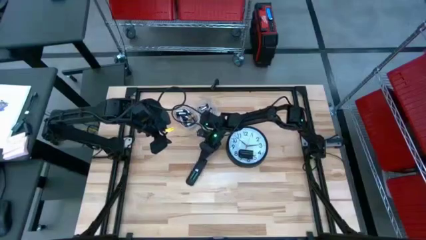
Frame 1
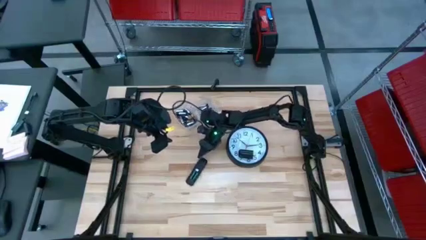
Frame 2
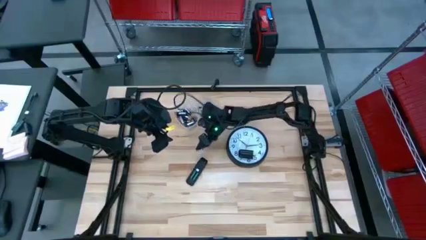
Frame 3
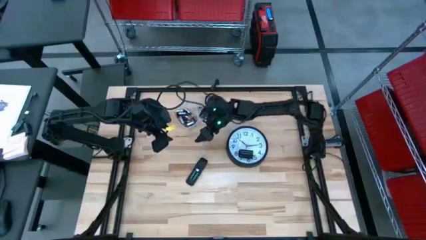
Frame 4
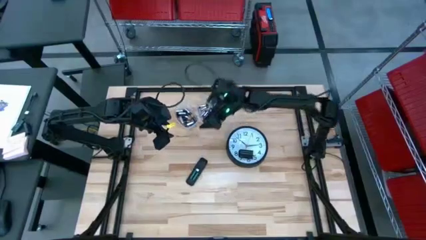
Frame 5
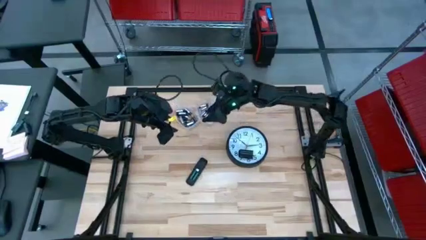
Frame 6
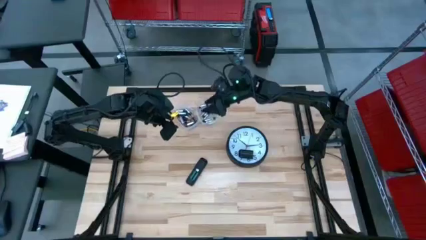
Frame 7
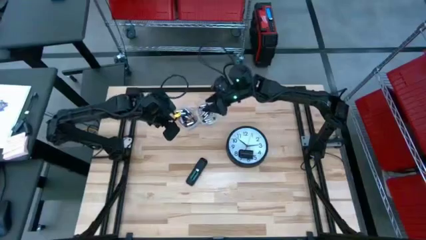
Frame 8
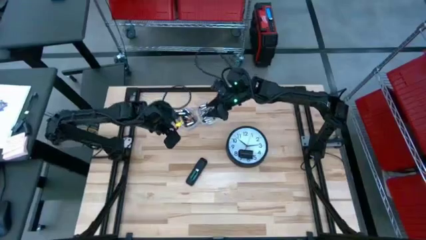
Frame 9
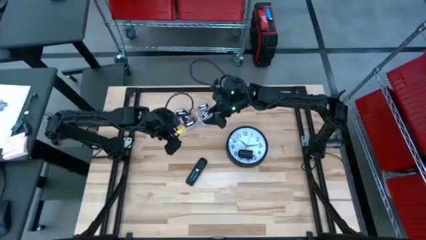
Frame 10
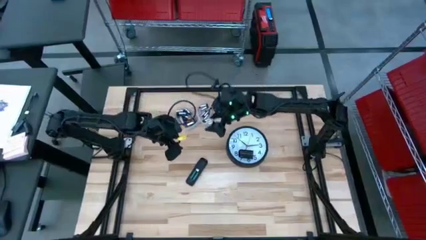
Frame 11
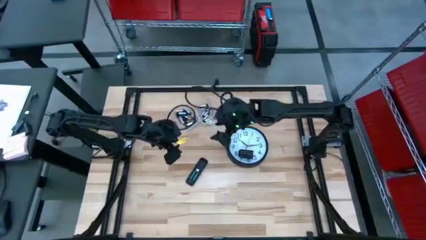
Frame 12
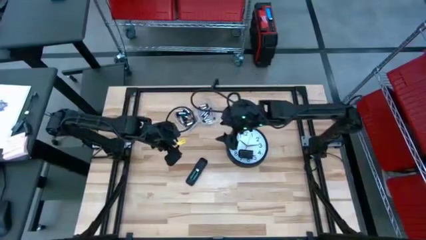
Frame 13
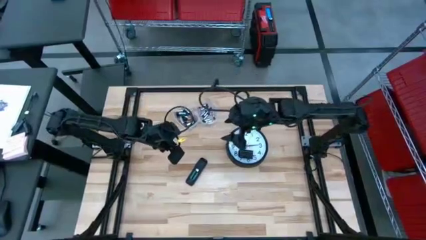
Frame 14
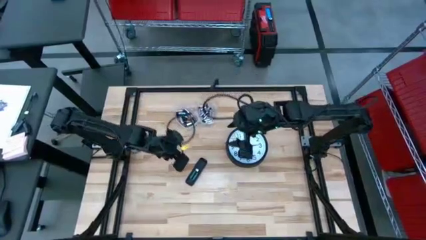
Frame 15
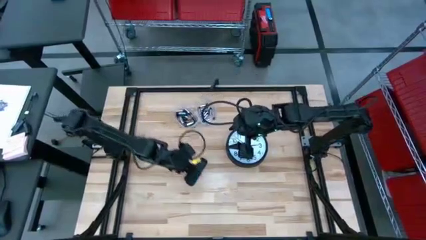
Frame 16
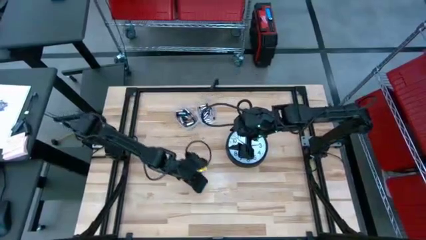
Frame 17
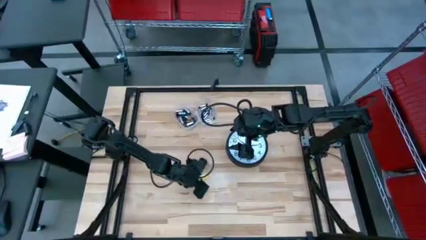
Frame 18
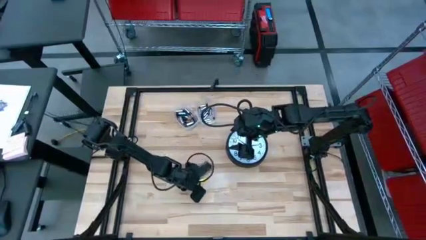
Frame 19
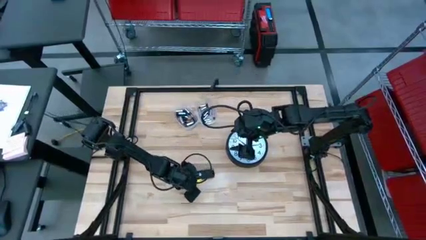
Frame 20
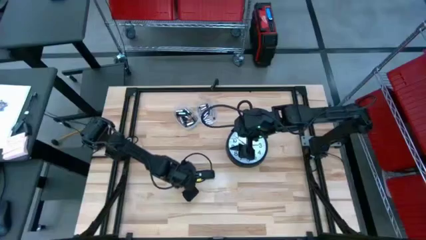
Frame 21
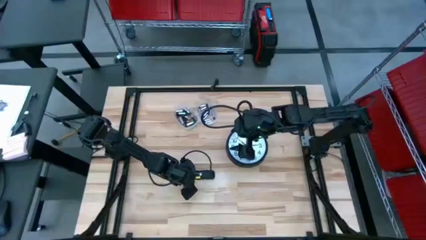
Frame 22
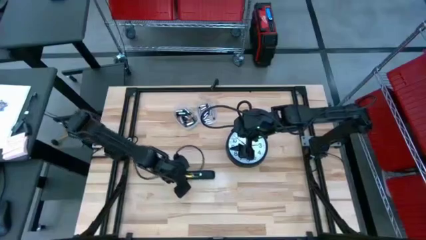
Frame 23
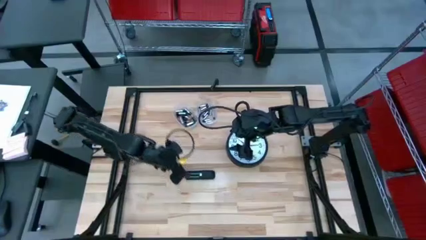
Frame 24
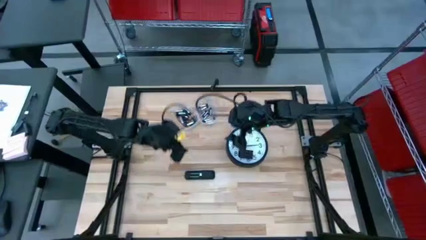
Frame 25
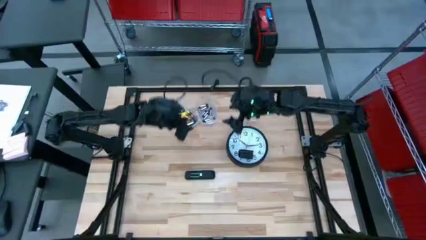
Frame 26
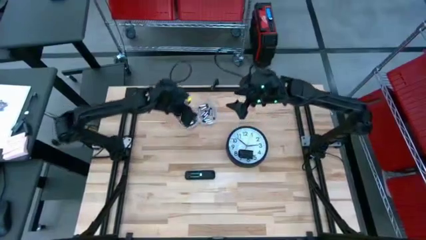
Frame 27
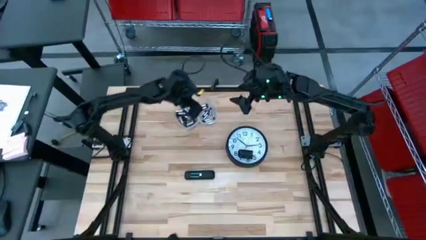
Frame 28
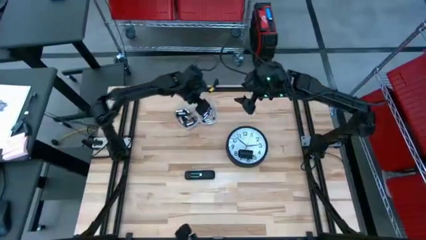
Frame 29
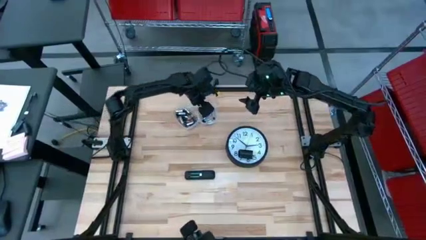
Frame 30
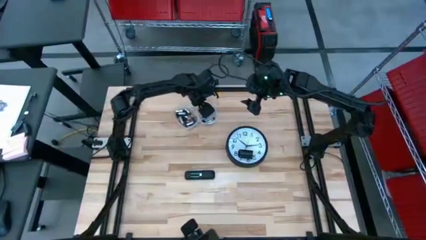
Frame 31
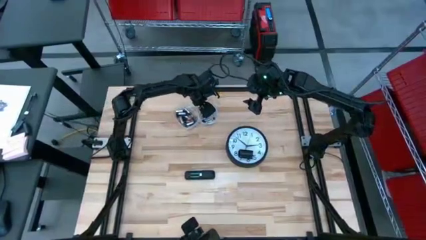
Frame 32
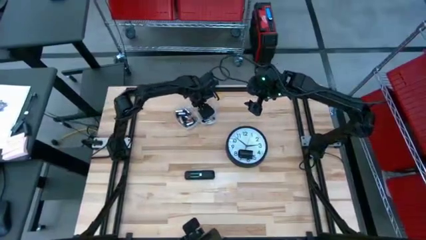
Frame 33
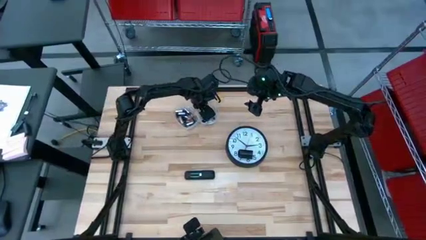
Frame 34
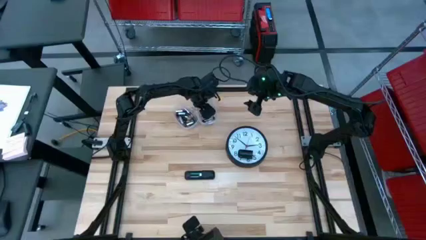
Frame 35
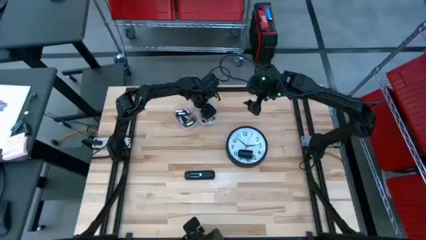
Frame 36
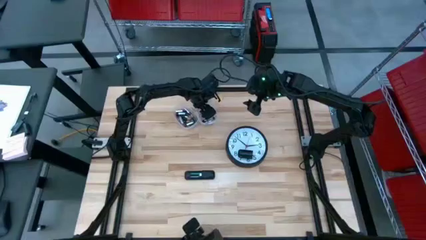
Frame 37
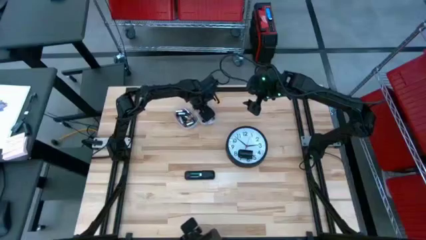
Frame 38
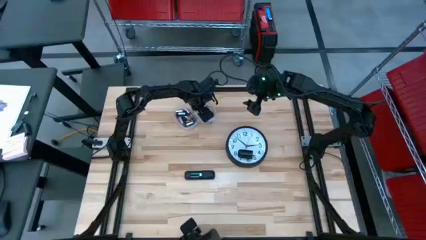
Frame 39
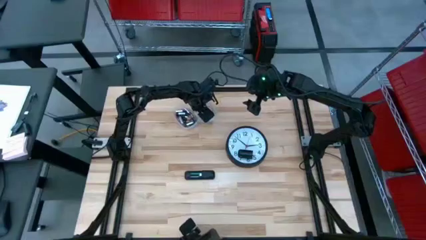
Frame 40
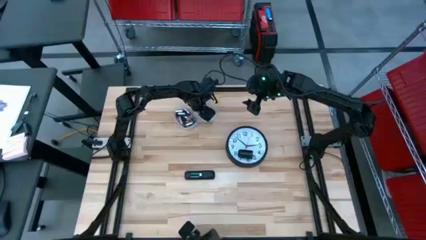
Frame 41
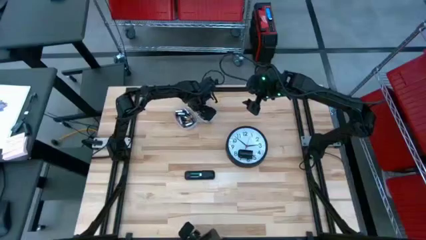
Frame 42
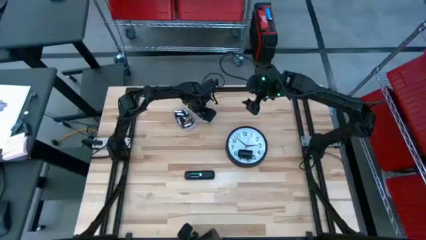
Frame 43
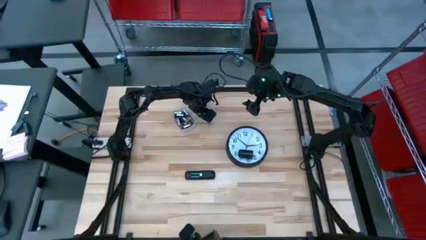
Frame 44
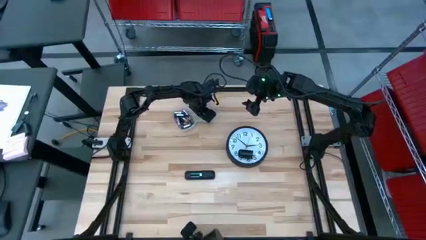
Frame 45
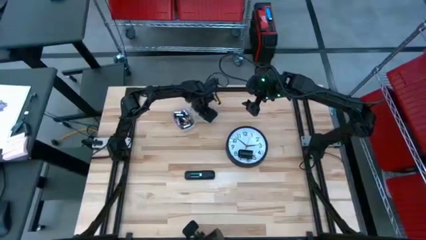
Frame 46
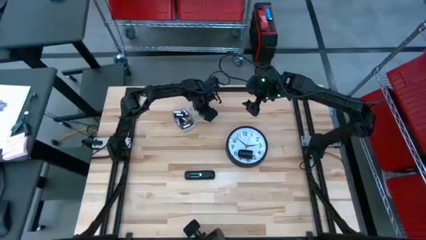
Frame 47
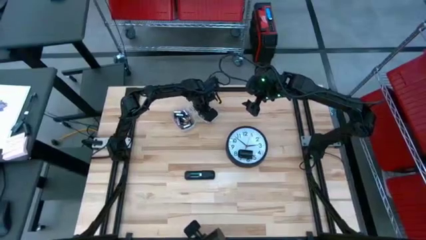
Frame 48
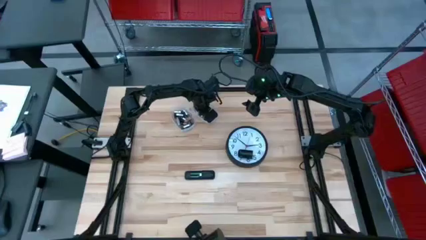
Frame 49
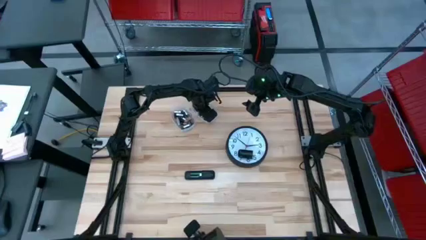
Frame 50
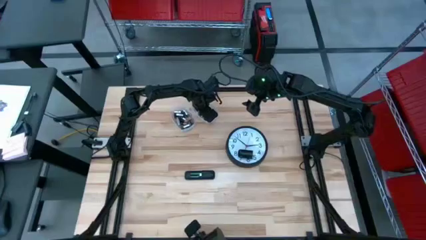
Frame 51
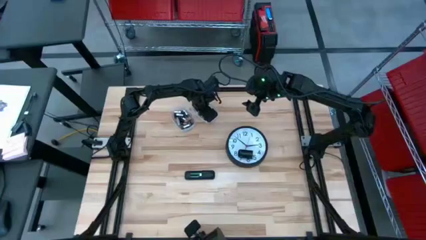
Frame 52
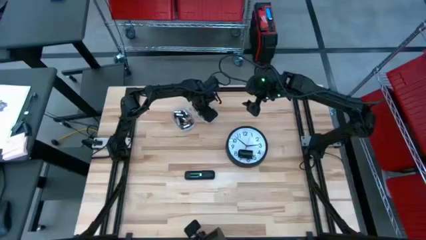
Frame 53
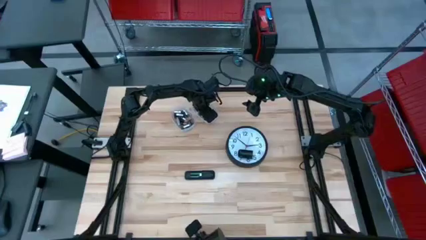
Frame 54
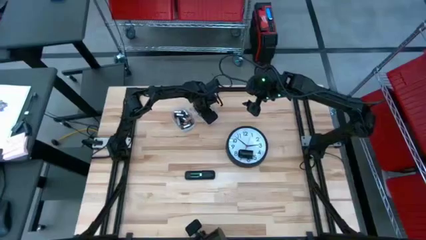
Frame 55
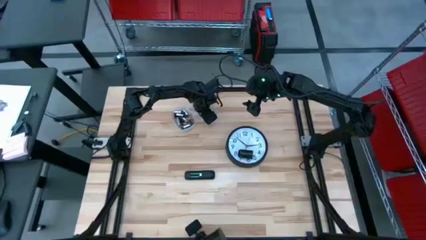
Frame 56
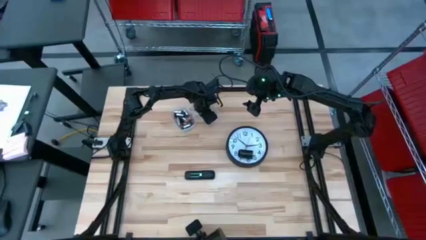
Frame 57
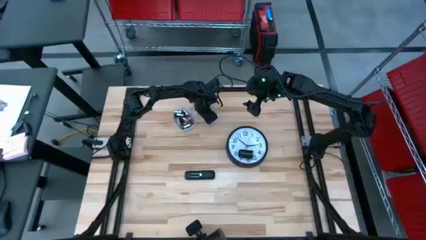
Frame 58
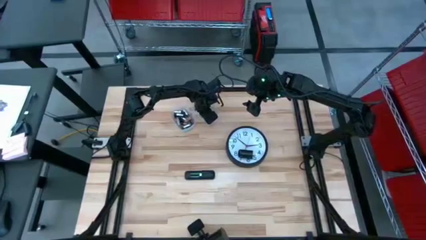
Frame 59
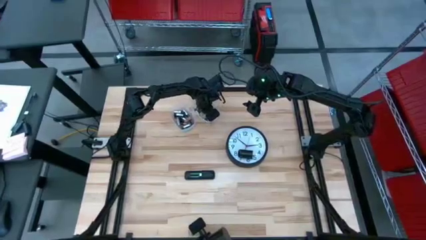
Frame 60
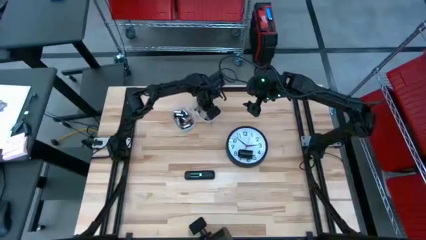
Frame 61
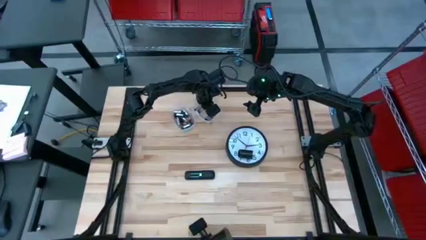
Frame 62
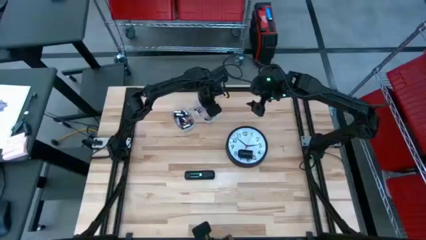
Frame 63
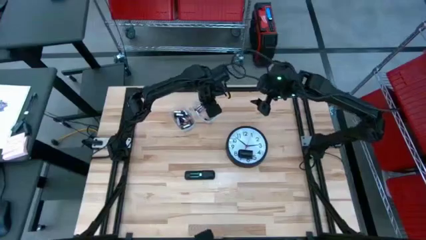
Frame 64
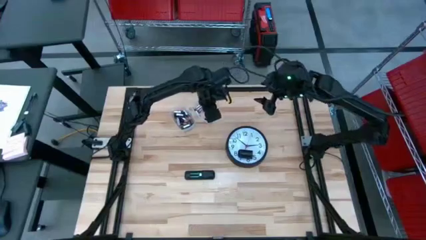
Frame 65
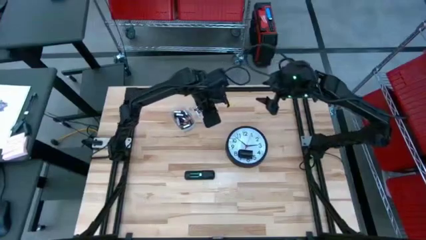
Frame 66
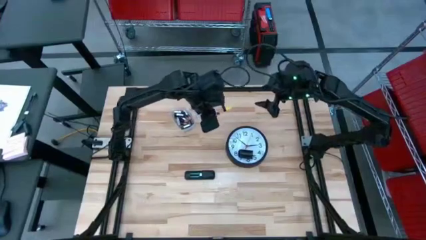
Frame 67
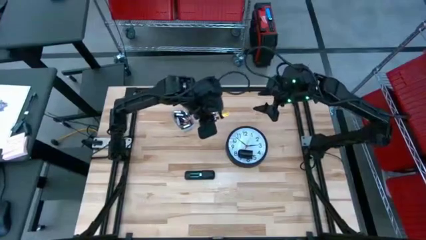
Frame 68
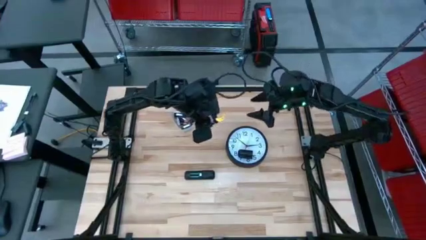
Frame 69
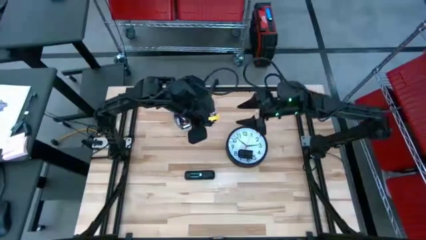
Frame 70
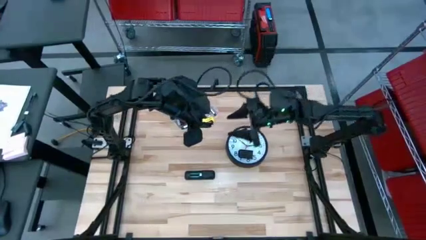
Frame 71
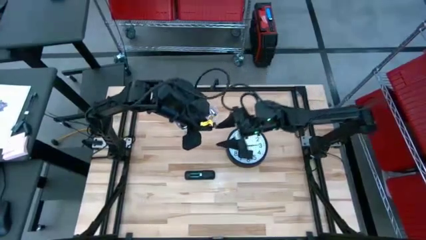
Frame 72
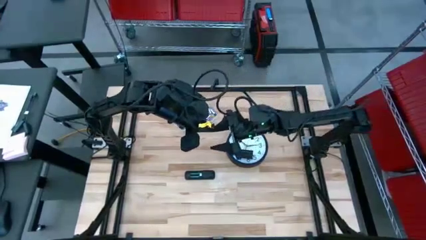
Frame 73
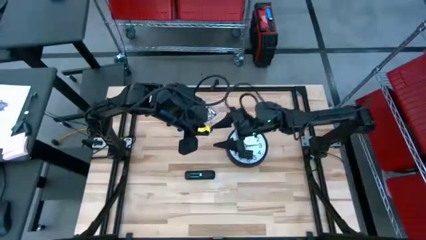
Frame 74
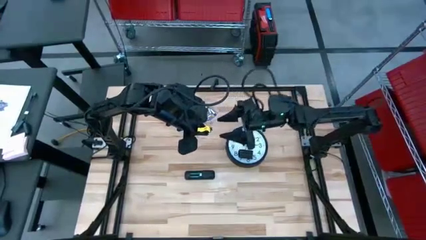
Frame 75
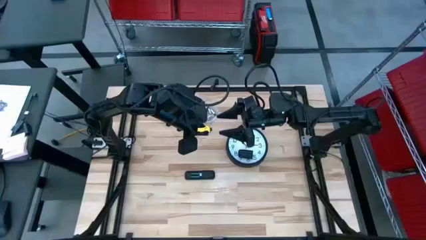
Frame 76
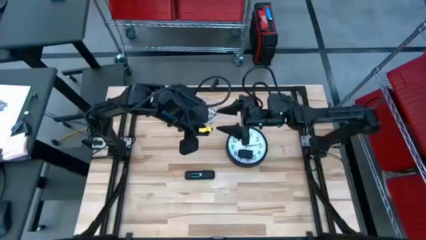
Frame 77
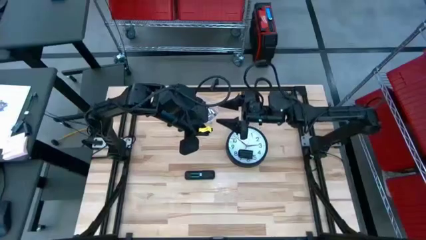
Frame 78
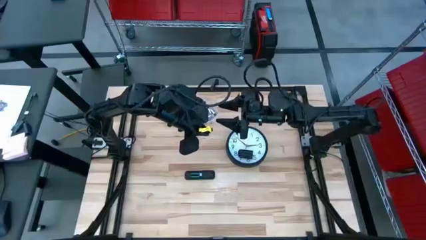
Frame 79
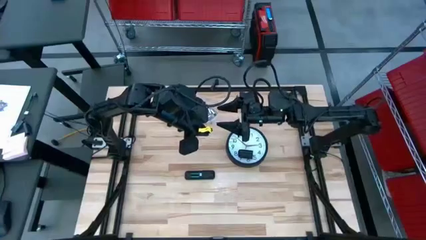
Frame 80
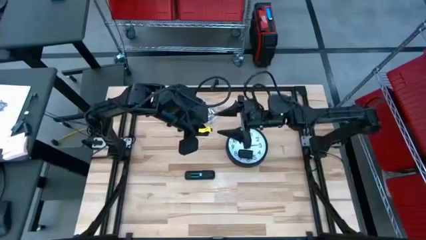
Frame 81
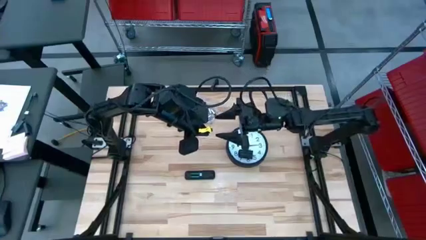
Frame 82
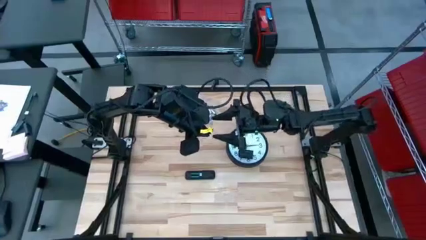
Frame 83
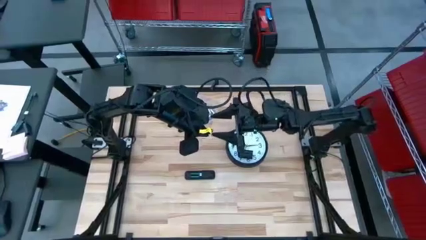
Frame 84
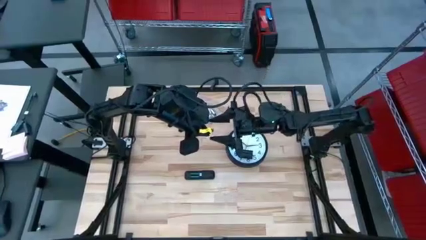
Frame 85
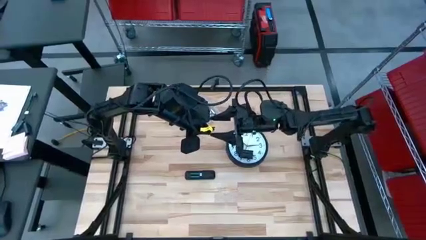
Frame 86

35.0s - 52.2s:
Task: Insert battery
Insert the silver battery into the remote control
